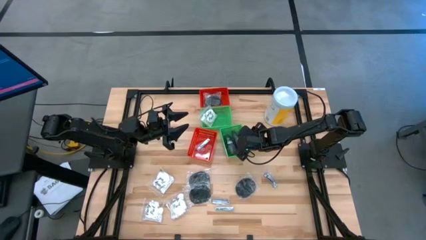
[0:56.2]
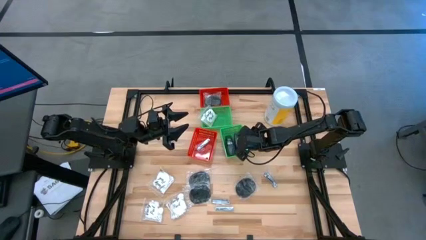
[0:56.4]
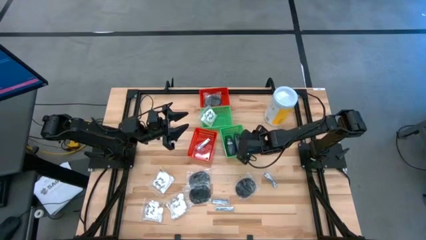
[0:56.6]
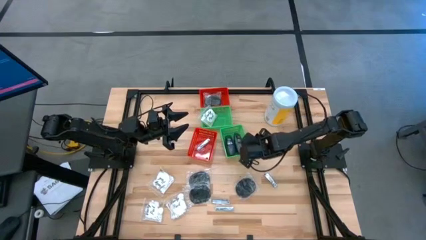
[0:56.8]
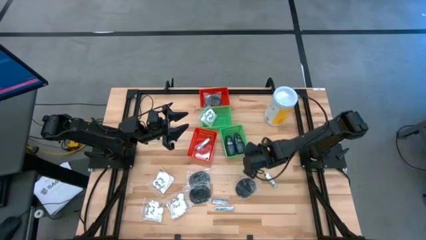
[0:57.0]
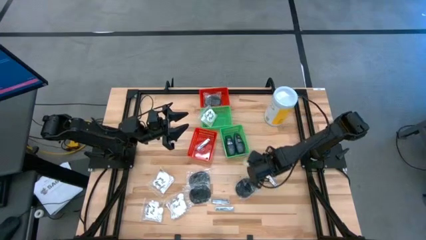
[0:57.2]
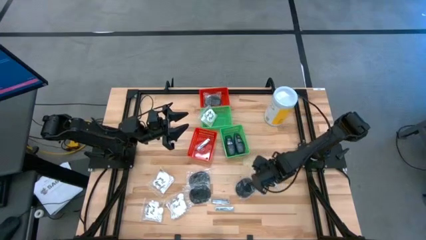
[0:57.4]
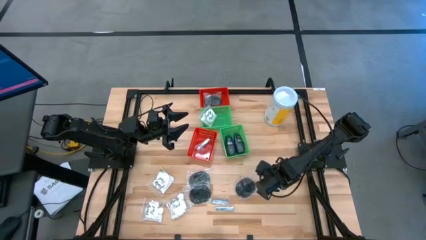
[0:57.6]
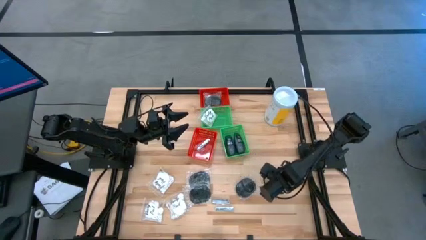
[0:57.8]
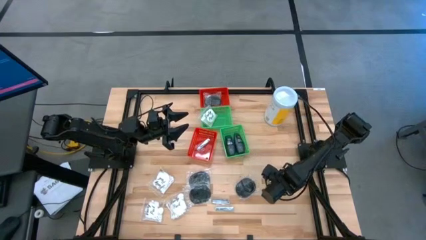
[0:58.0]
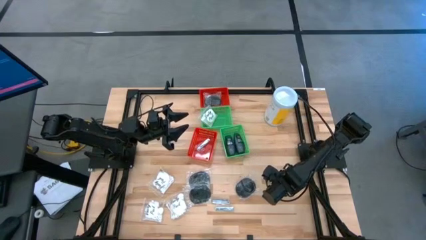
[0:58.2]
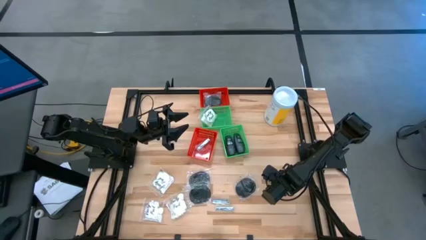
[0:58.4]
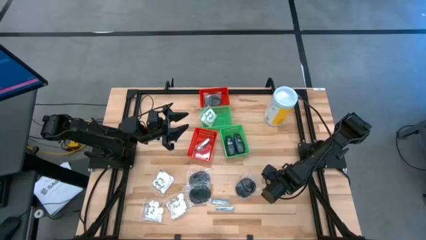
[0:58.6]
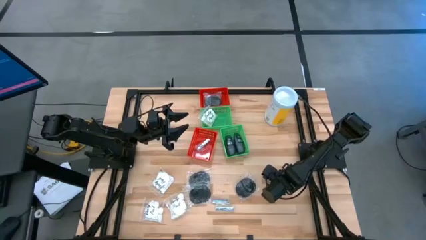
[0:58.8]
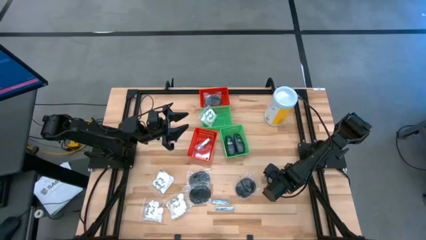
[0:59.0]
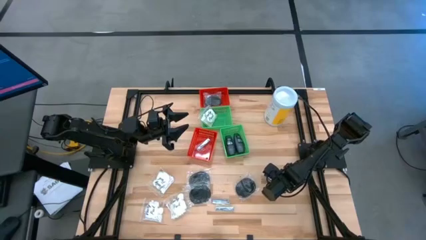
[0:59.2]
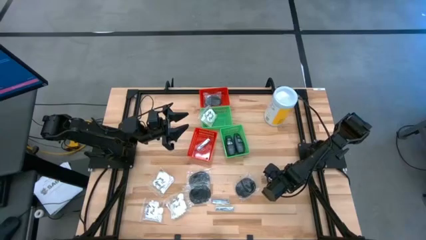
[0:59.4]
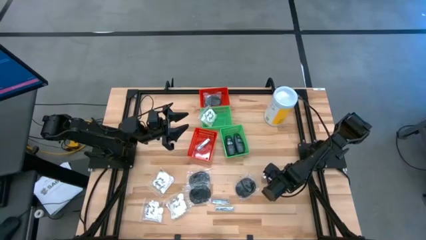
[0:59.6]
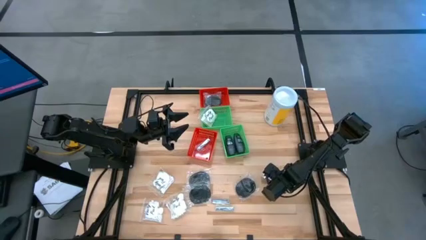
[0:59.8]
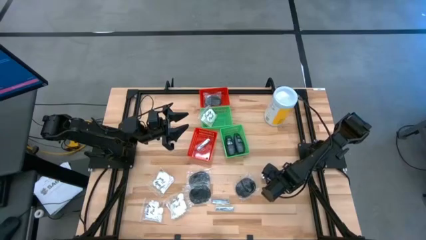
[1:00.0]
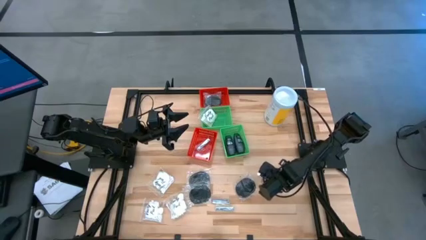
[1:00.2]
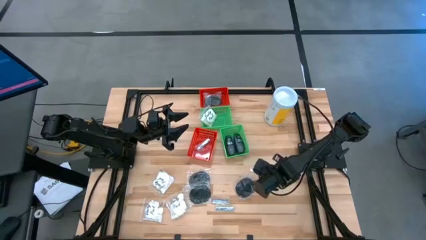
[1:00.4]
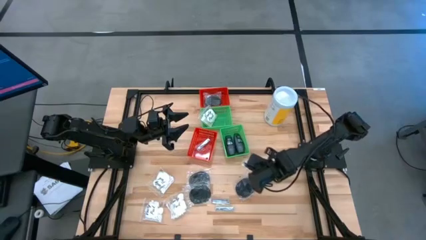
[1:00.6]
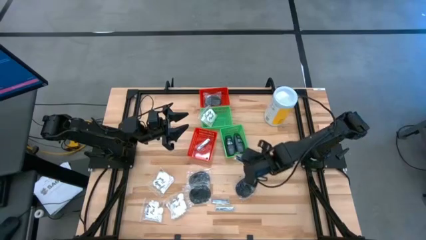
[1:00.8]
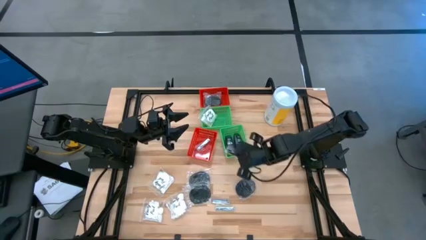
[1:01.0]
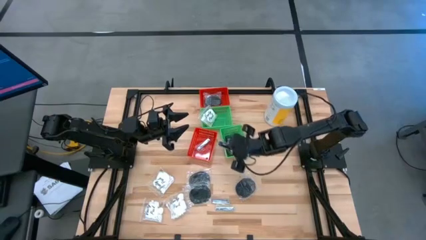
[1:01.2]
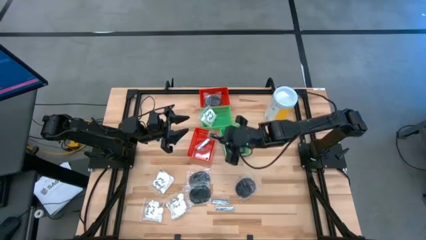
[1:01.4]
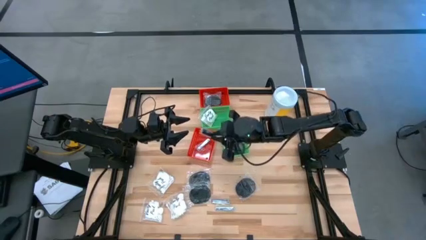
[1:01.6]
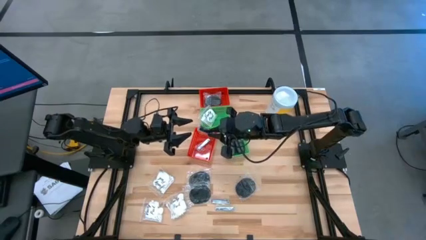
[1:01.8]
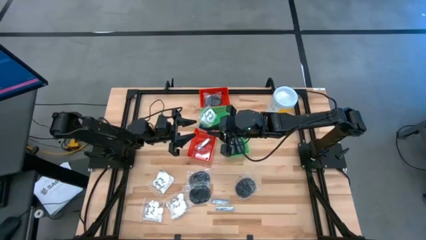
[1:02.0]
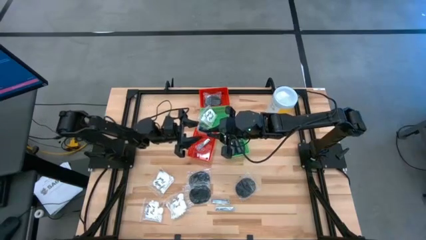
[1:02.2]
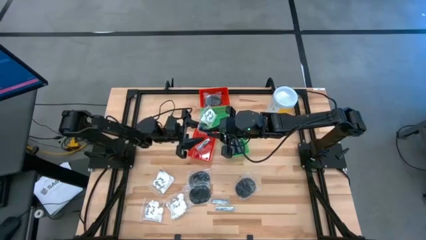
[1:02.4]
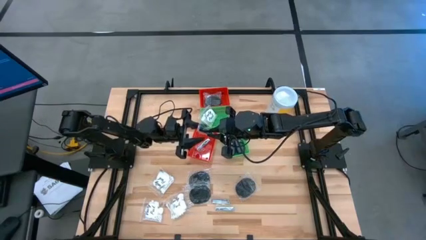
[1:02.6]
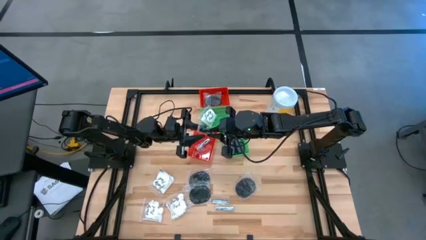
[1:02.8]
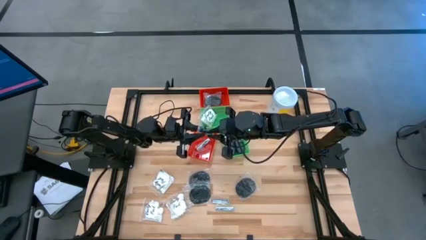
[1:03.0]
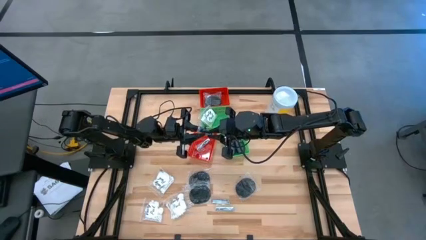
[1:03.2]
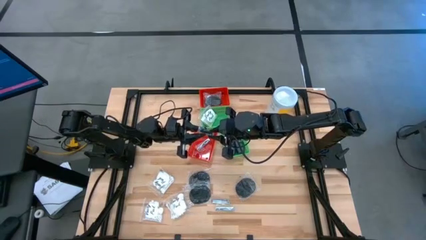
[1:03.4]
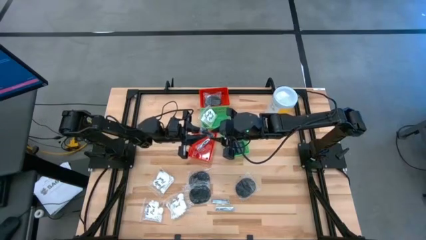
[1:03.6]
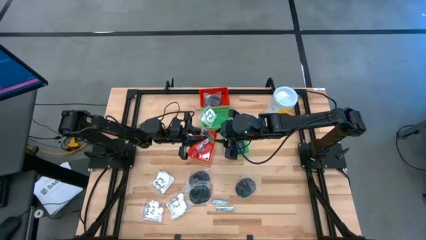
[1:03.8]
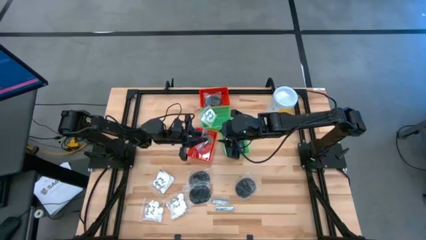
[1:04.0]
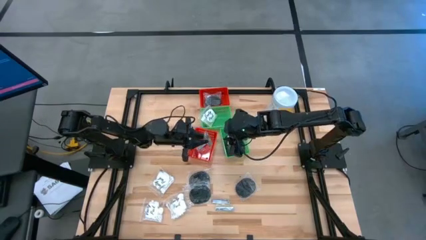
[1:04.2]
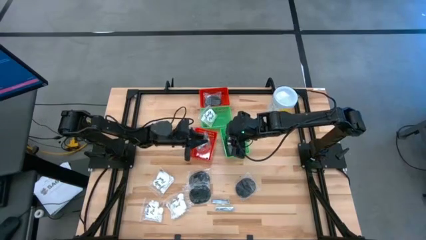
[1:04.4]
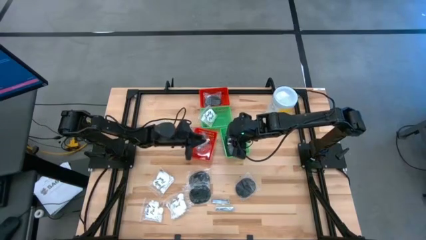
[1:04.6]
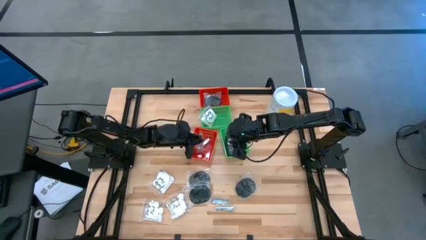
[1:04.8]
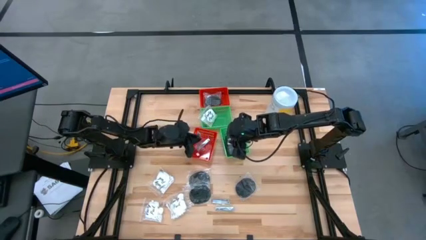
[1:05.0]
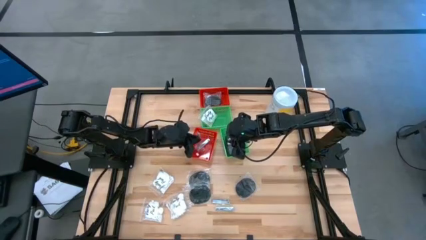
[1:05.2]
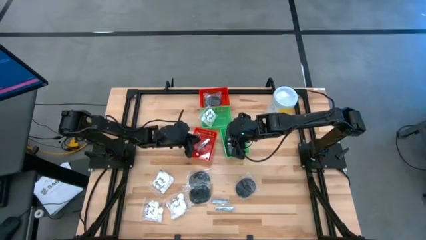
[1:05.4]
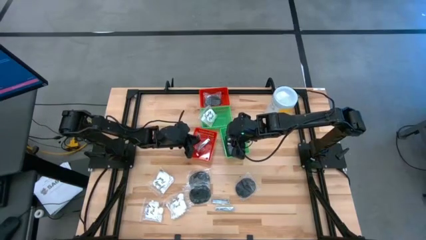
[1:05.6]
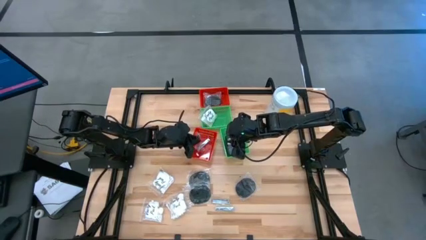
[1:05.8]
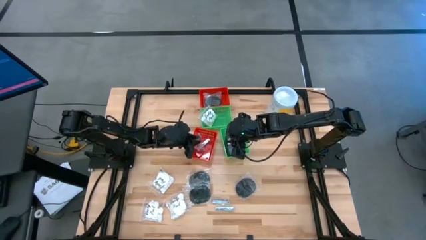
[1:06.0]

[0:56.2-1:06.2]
Task: Pick & Place Travel size toiletries
Put the silver nail cutter into the bottom red bin

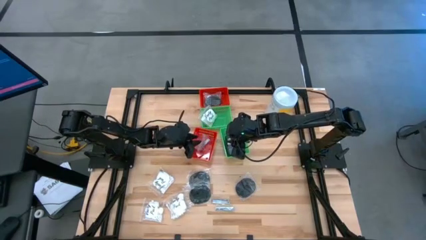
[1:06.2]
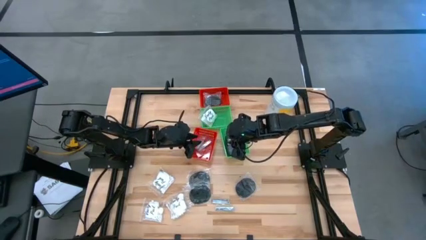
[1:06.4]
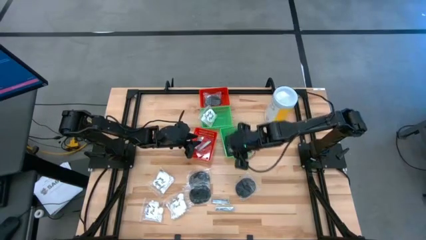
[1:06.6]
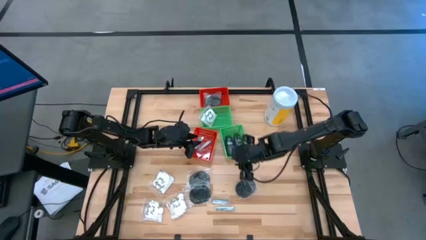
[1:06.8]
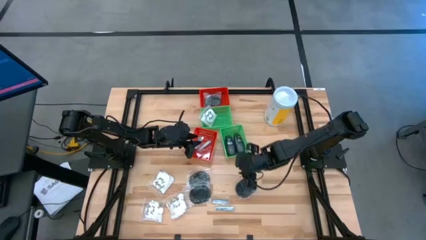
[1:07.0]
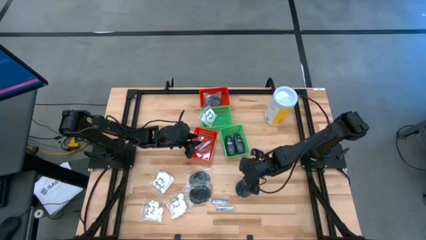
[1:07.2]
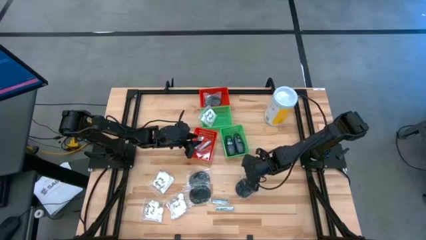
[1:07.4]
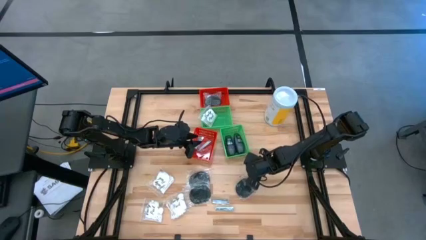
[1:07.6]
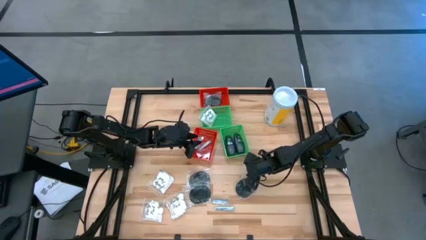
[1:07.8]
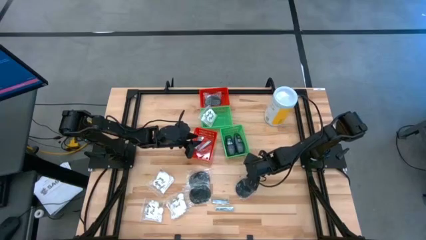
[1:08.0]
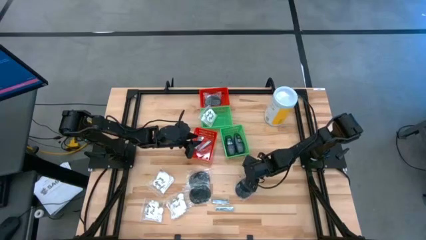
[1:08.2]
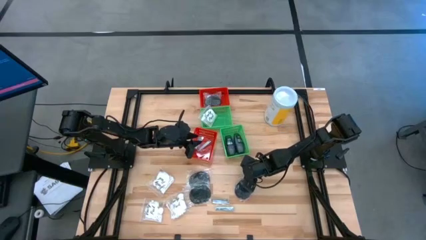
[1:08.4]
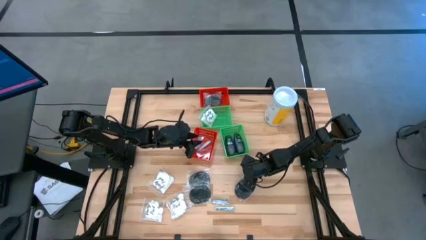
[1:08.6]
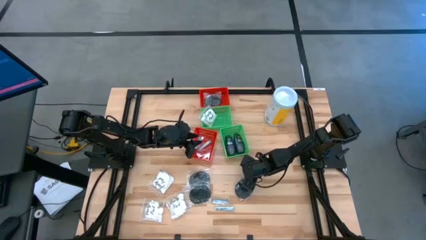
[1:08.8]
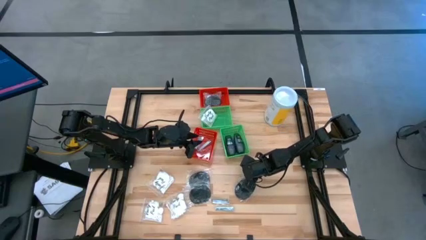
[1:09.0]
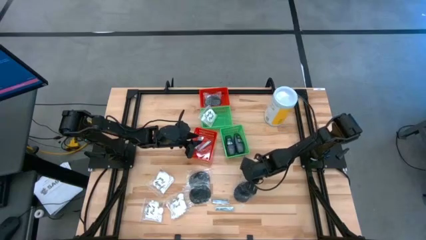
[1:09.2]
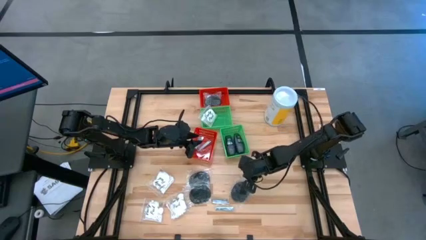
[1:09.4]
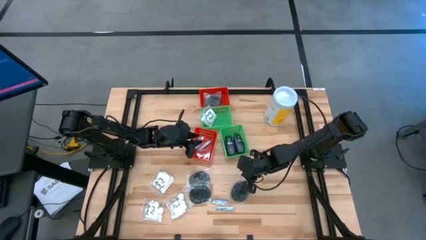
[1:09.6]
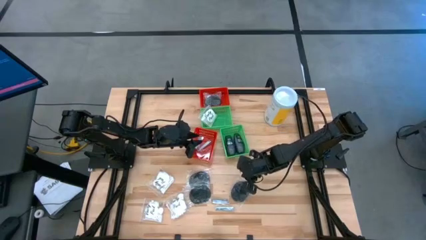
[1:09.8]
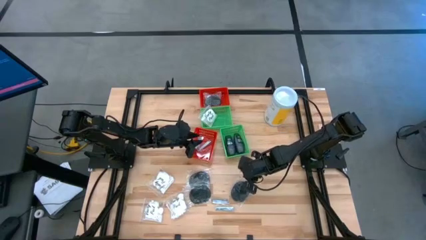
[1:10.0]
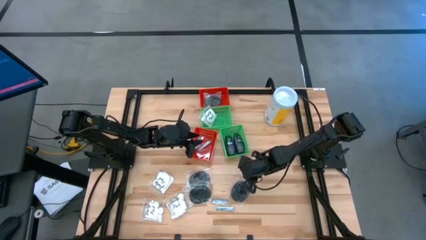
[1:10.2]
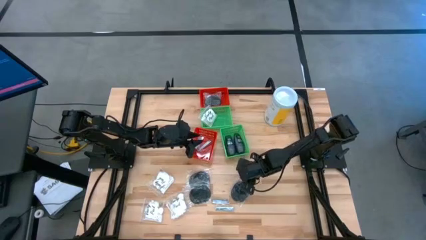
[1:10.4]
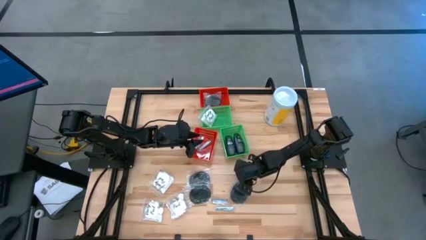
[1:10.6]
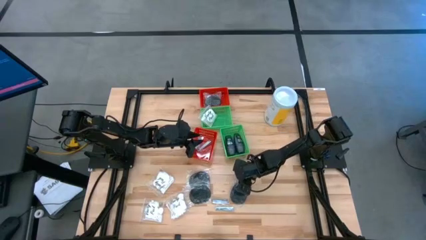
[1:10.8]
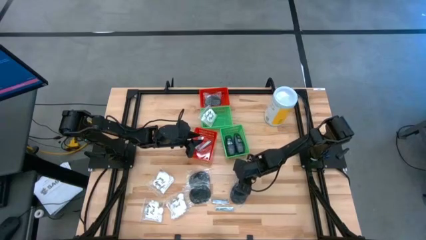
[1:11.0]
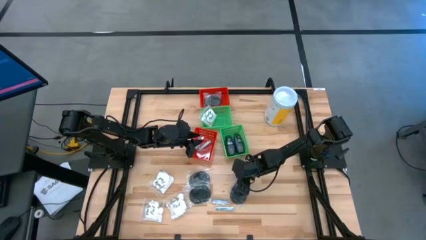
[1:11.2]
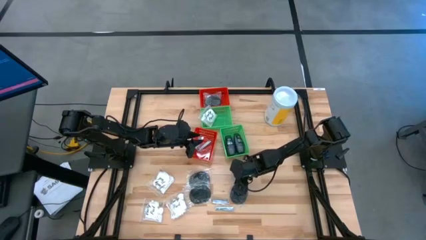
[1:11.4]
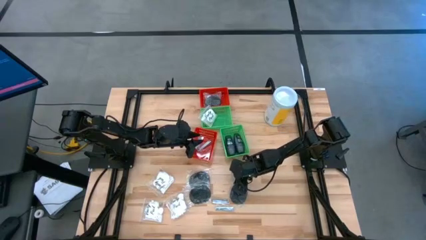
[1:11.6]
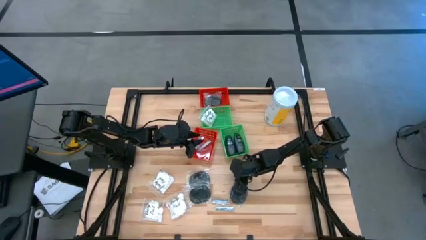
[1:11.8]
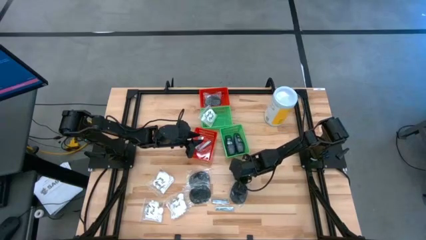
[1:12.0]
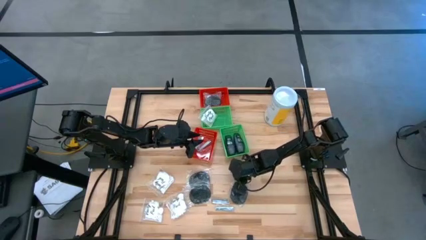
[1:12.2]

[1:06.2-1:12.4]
Put the black hairbrush into the top red bin
